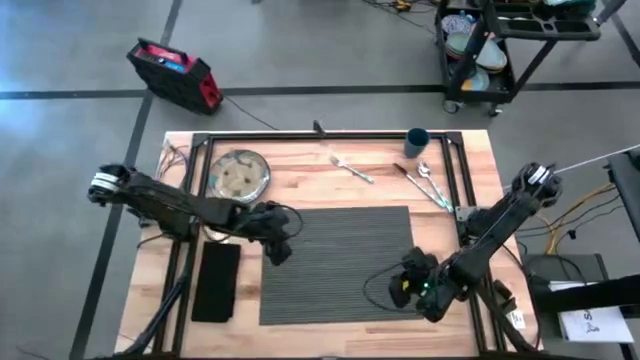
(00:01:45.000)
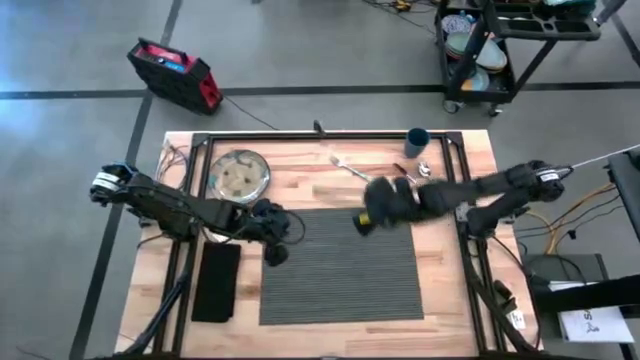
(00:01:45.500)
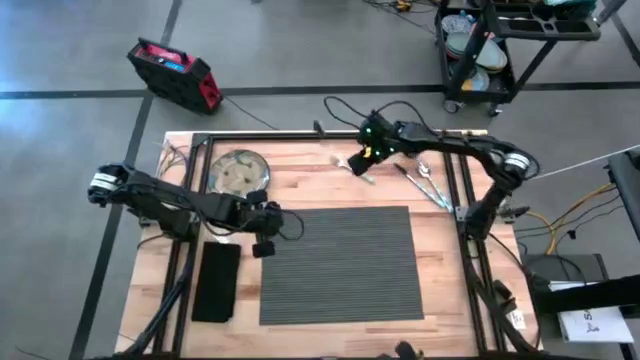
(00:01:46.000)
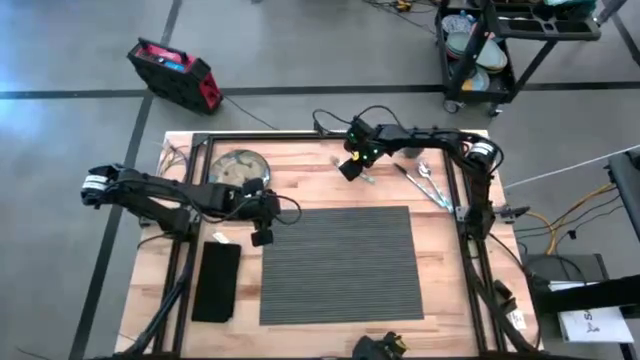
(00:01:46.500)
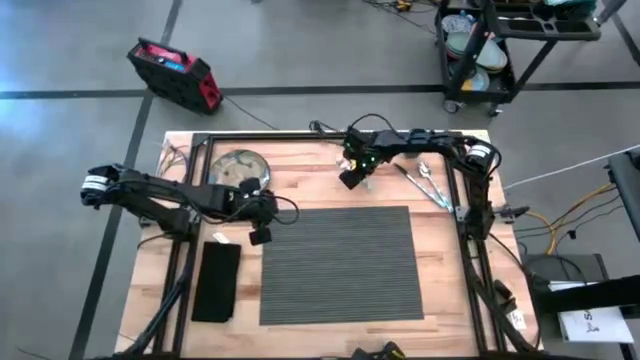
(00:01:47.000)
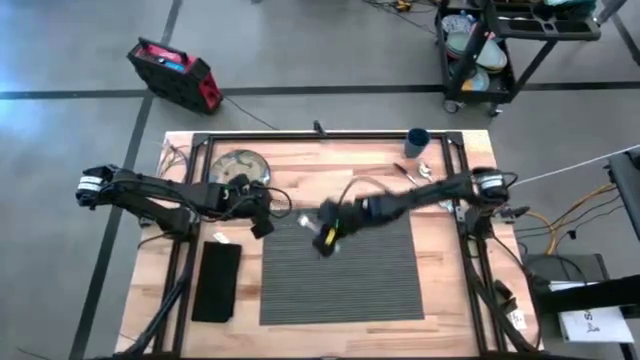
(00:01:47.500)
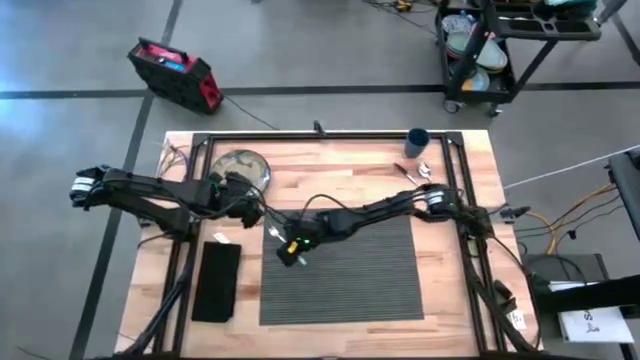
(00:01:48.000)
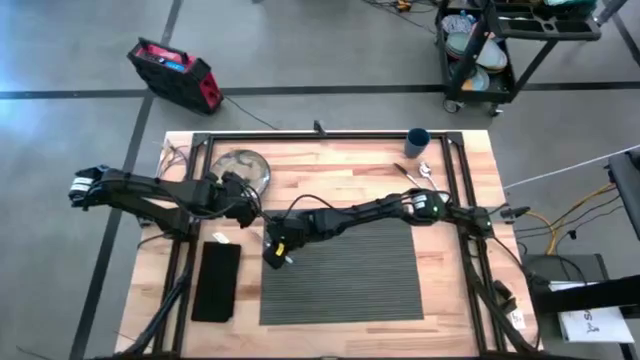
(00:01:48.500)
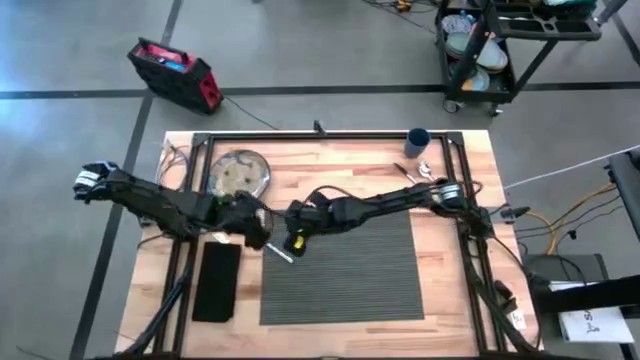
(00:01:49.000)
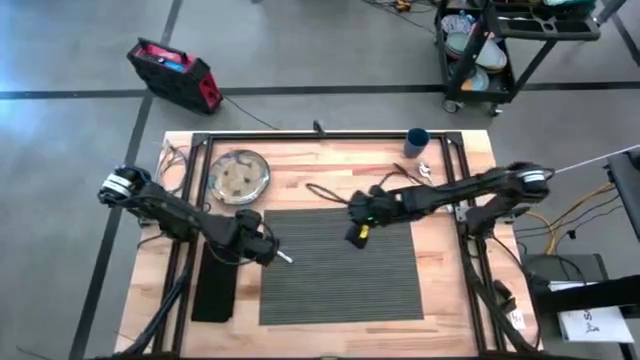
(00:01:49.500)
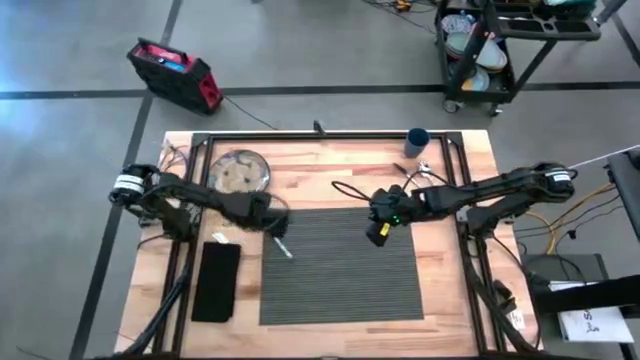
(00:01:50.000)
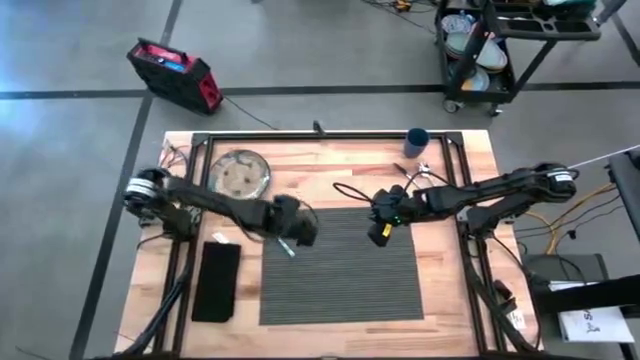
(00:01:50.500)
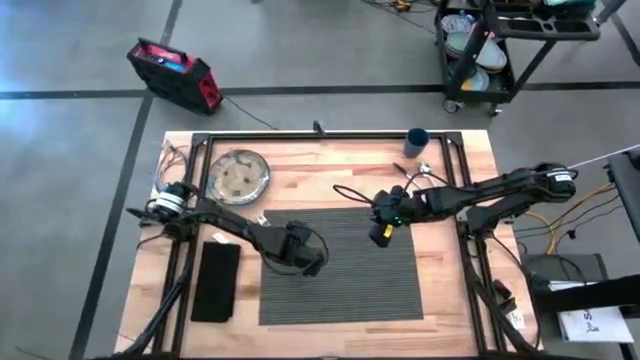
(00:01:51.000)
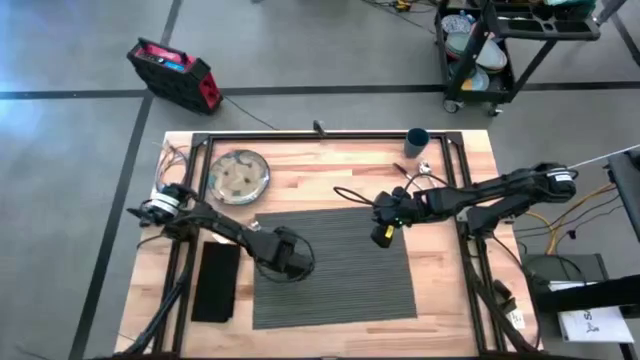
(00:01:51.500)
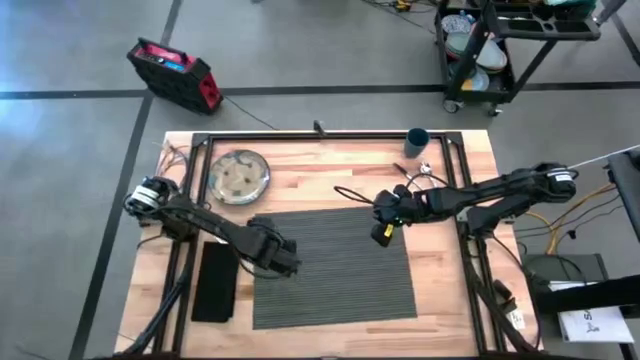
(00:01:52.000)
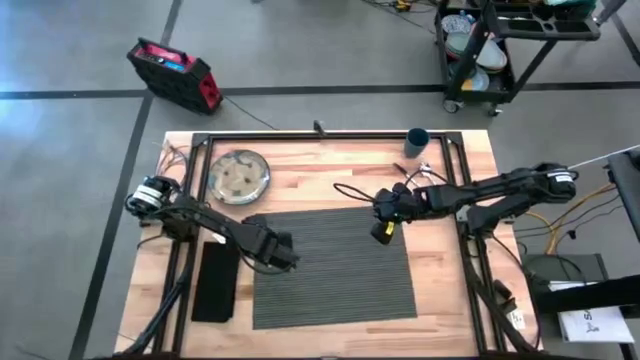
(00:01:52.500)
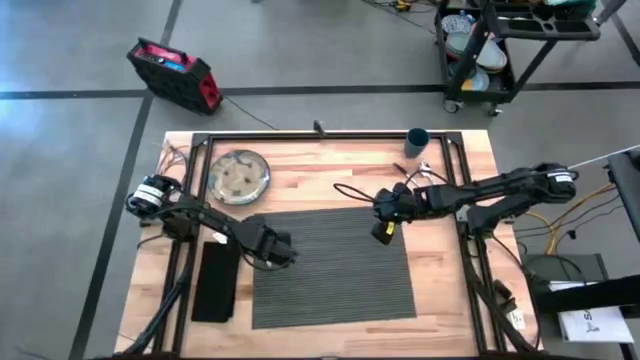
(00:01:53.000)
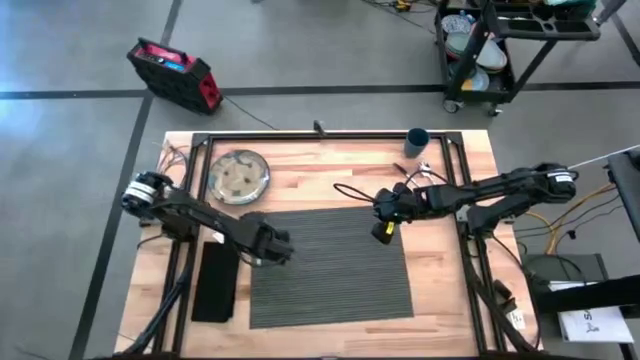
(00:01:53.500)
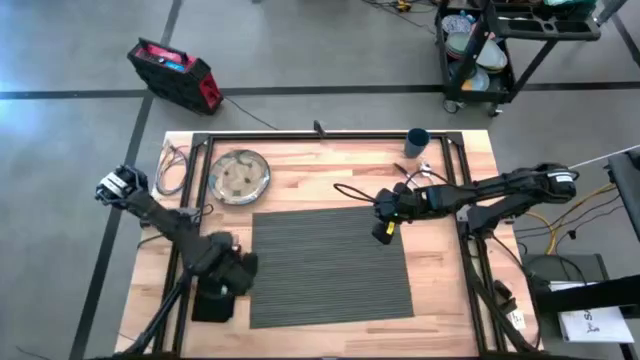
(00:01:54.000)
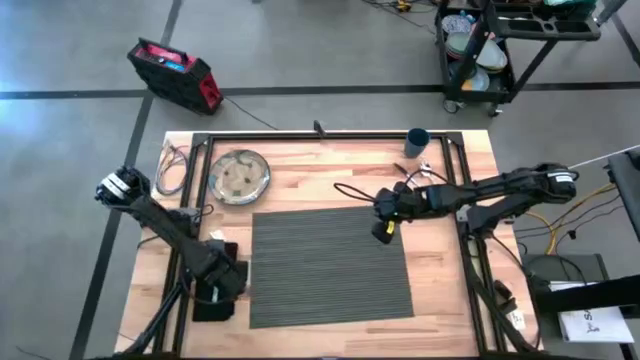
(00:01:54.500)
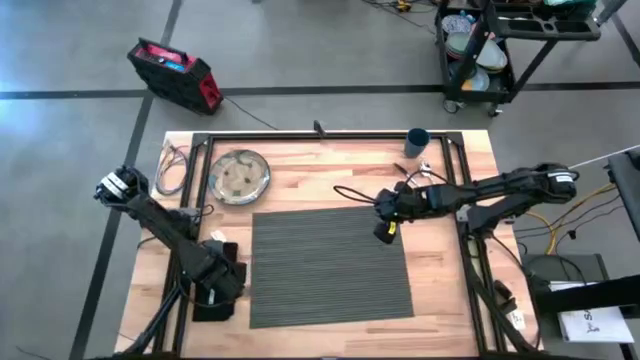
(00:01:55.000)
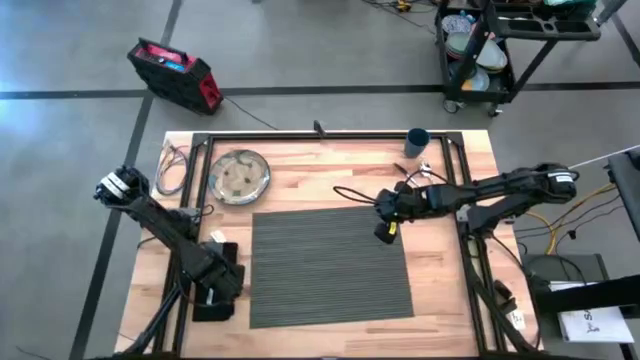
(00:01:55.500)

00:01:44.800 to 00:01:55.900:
Task: Set table place
Put the white and blue patterned fork on the black napkin

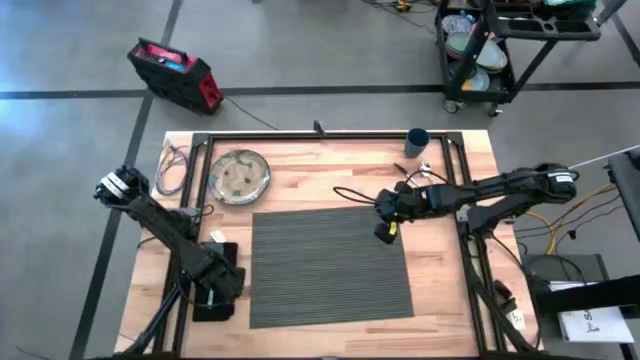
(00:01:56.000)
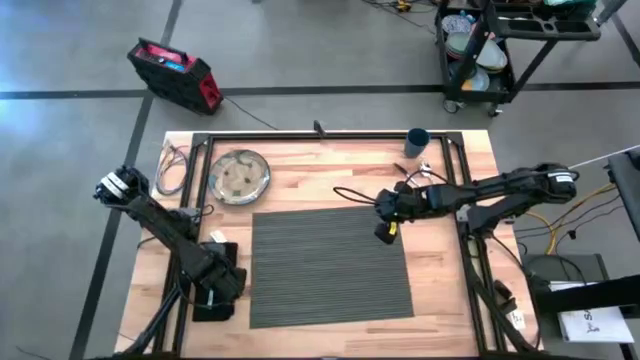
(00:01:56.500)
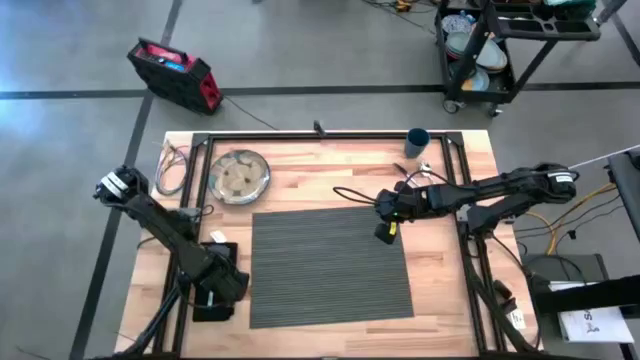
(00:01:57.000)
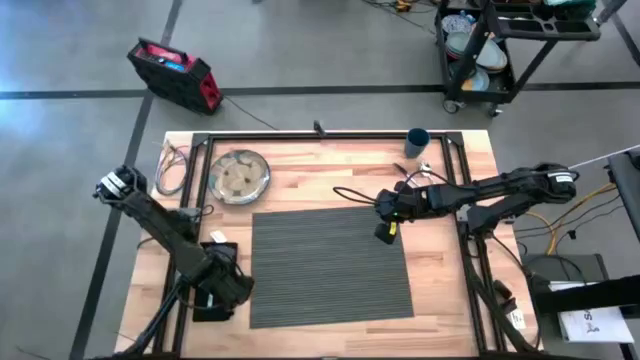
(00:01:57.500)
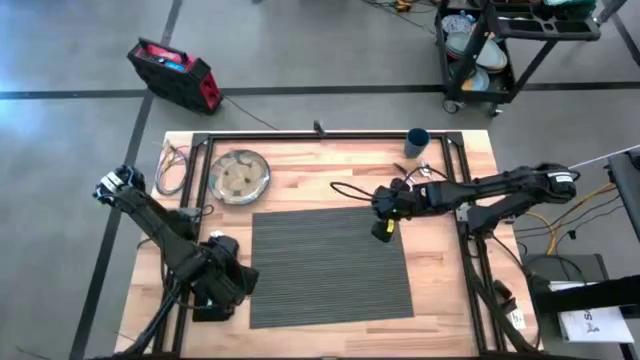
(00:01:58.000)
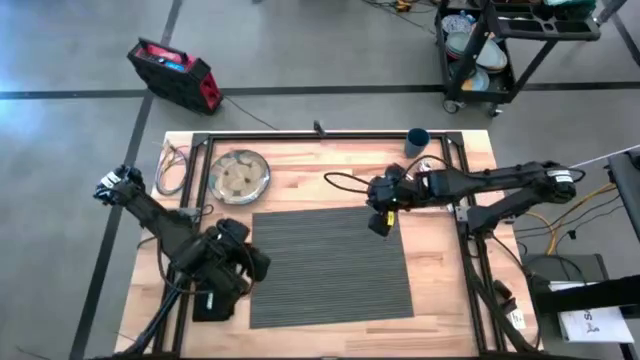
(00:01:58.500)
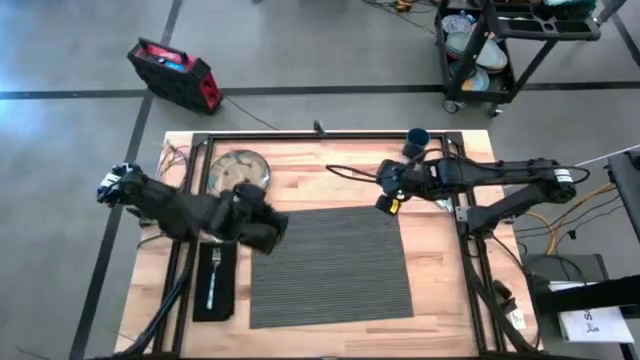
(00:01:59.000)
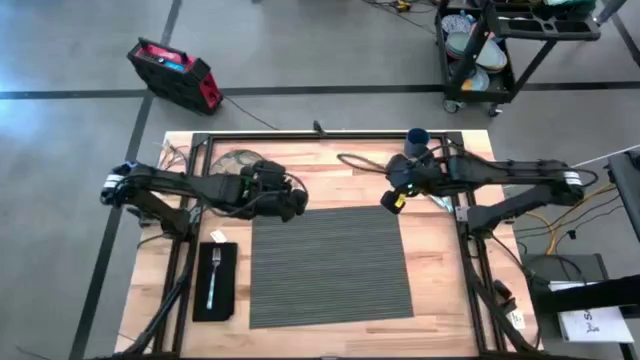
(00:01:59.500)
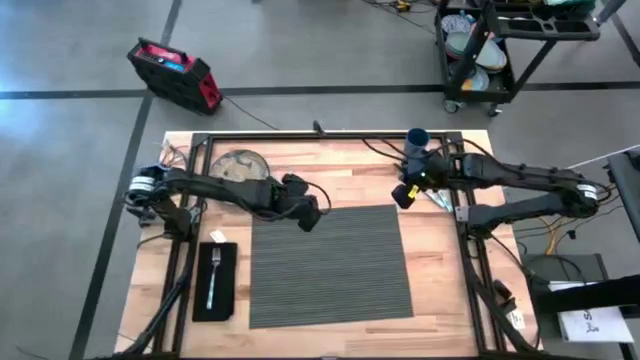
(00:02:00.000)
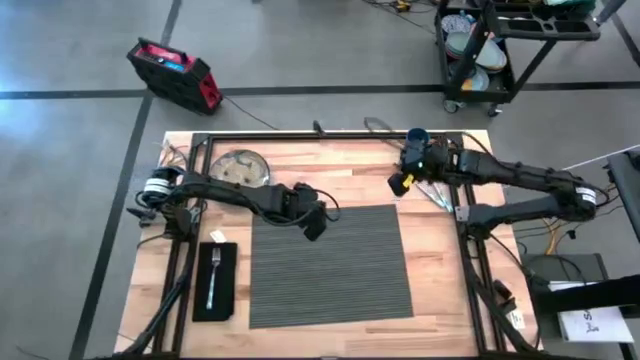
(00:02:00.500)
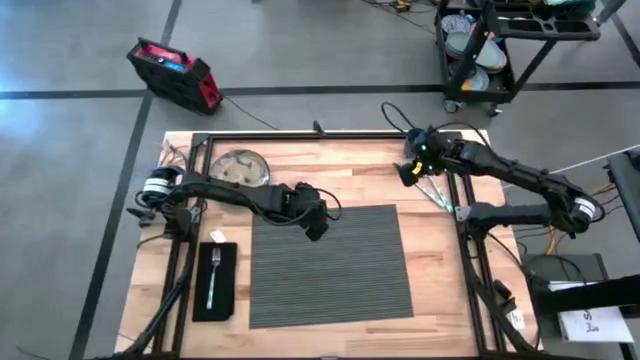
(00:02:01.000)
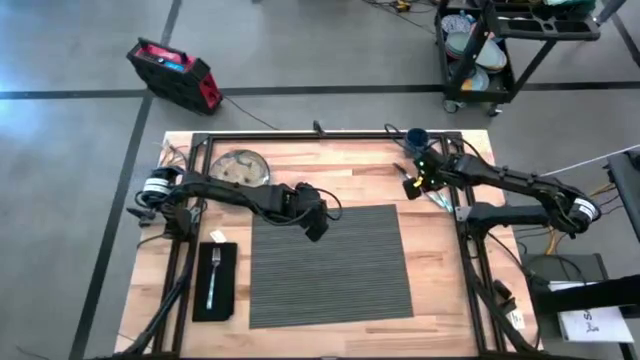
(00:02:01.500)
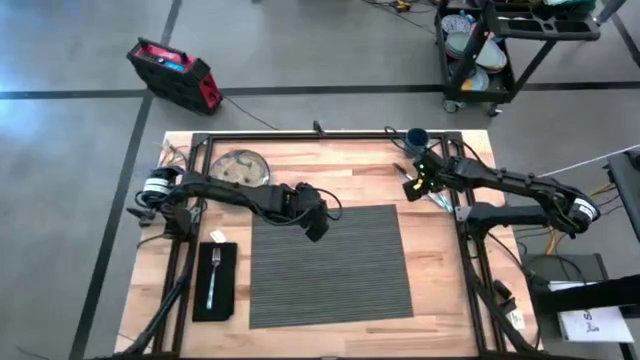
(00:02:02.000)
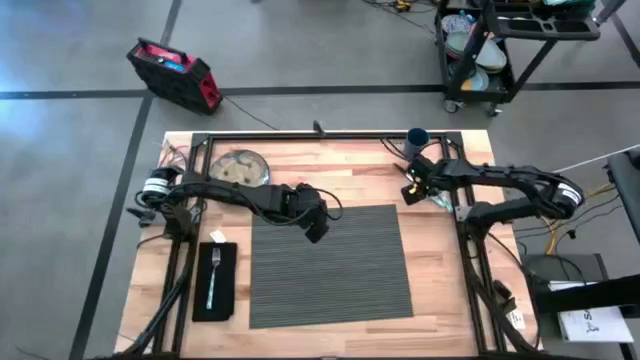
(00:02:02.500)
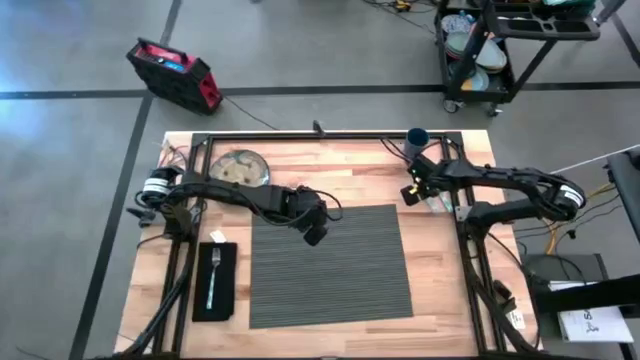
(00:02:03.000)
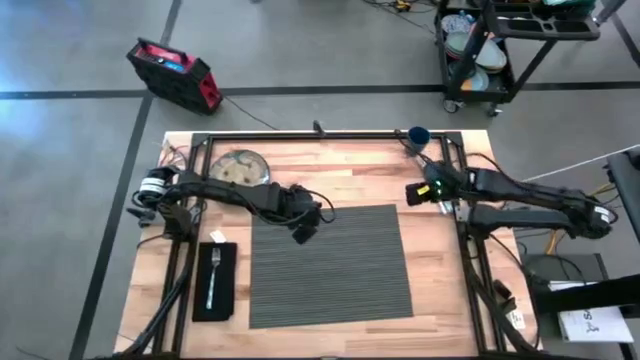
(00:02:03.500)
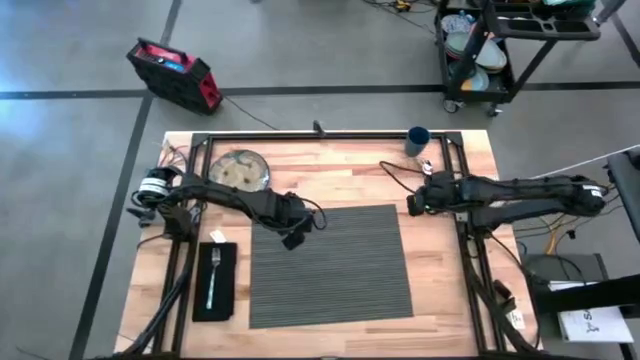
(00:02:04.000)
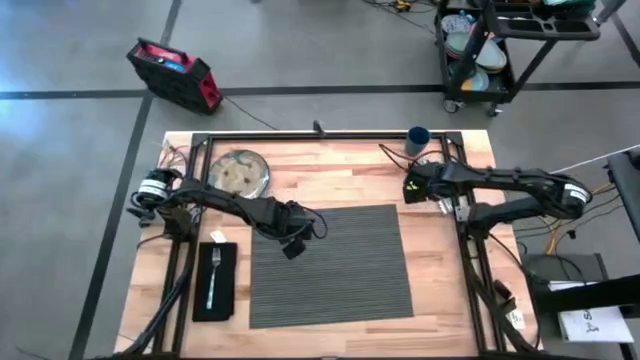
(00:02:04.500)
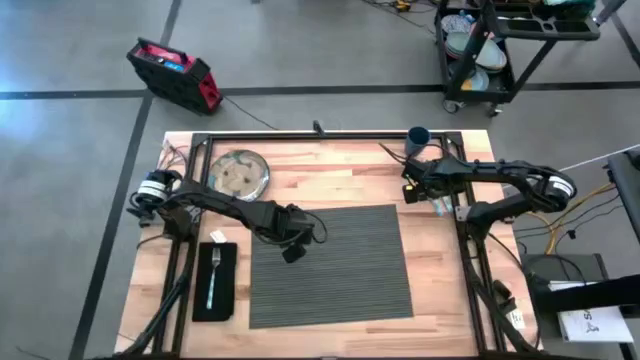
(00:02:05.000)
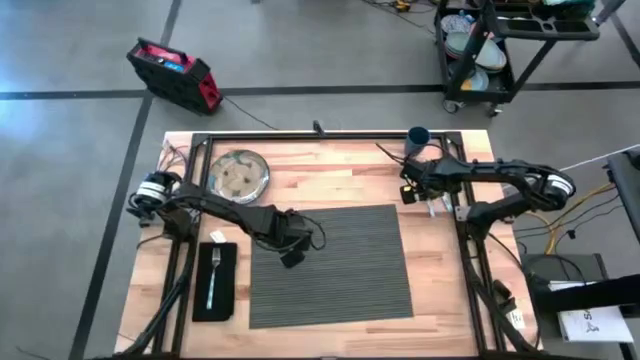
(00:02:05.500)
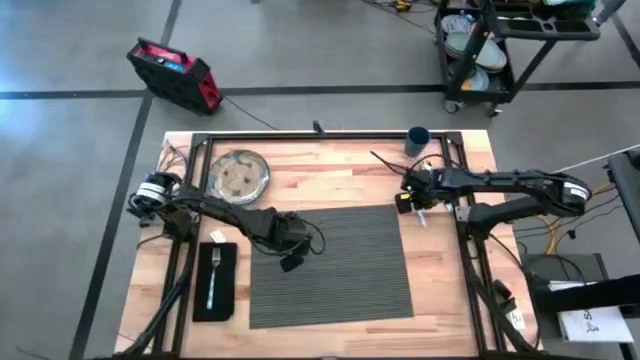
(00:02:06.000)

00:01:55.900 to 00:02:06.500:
Put the white and blue patterned knife on the dark blue table mat
